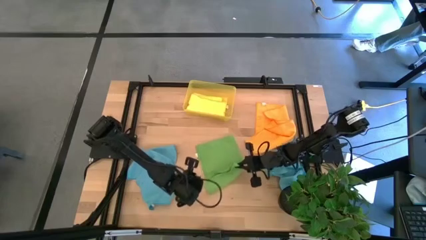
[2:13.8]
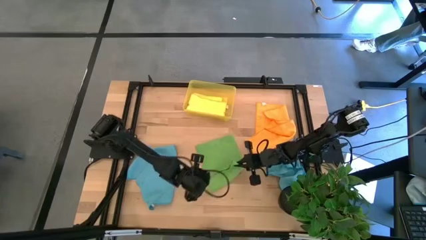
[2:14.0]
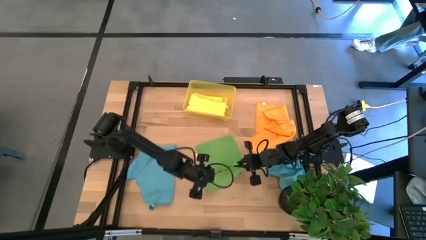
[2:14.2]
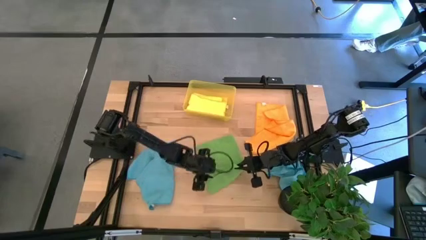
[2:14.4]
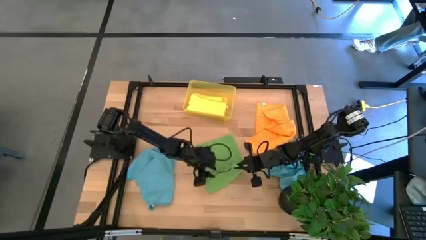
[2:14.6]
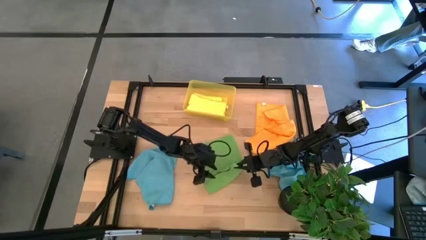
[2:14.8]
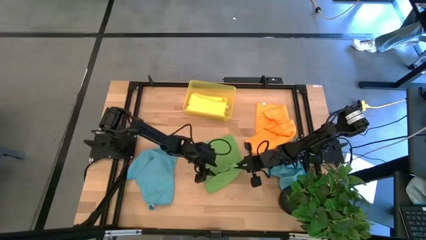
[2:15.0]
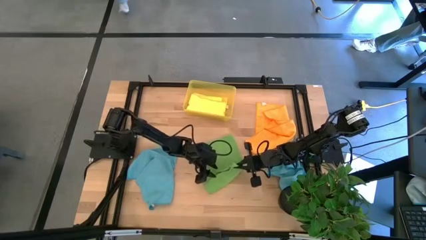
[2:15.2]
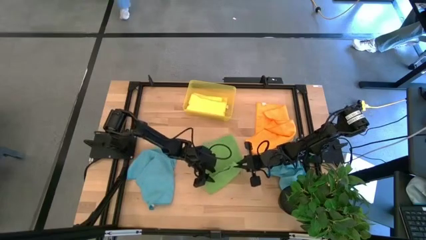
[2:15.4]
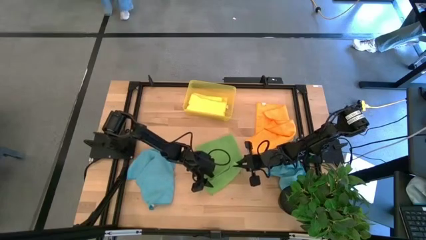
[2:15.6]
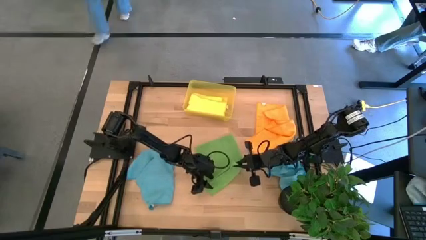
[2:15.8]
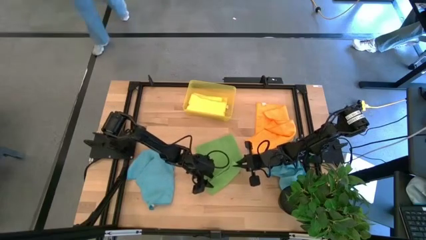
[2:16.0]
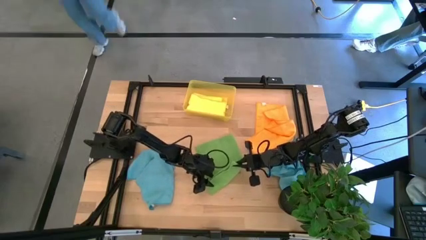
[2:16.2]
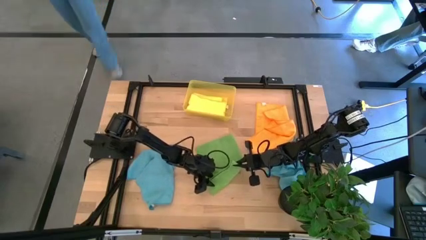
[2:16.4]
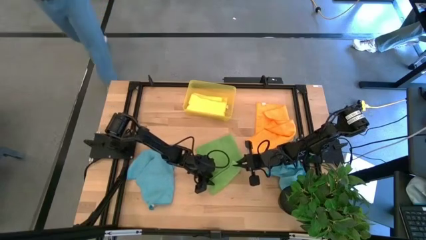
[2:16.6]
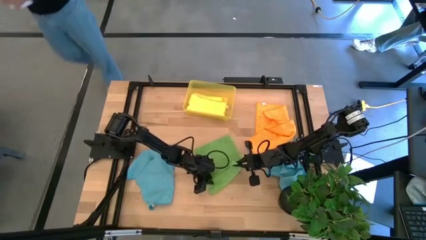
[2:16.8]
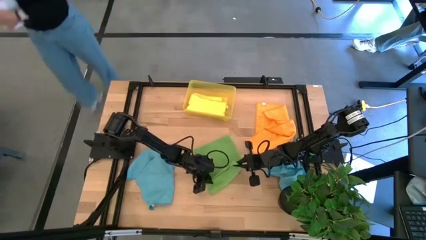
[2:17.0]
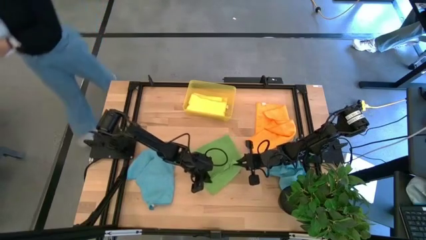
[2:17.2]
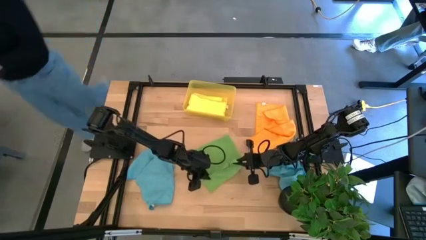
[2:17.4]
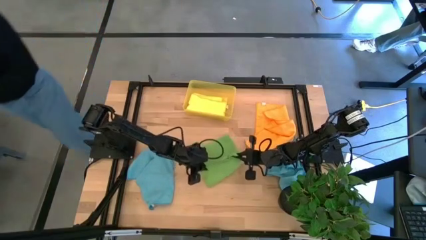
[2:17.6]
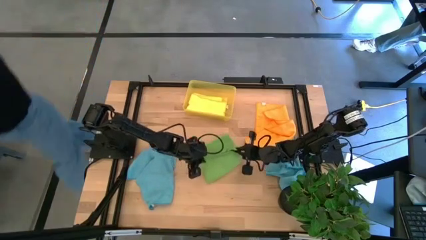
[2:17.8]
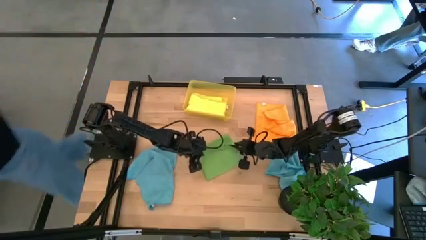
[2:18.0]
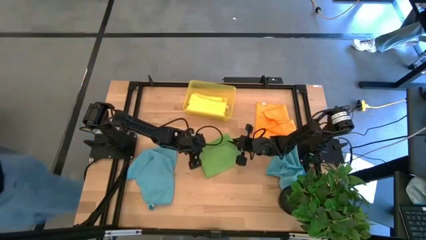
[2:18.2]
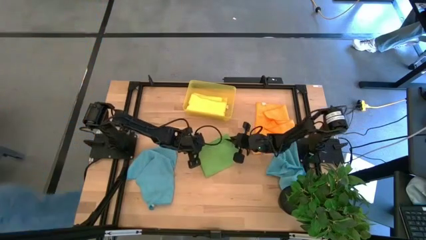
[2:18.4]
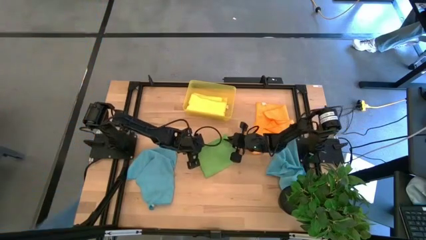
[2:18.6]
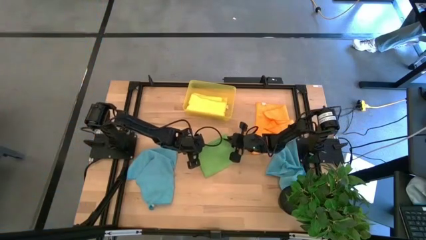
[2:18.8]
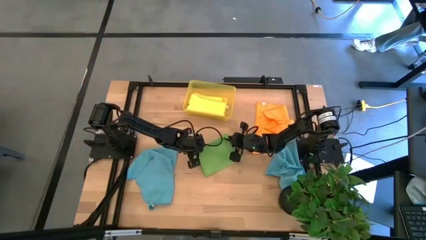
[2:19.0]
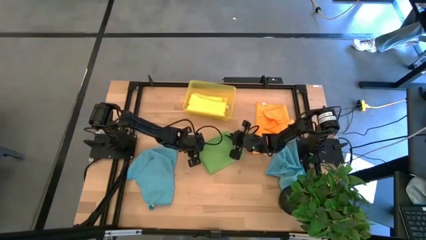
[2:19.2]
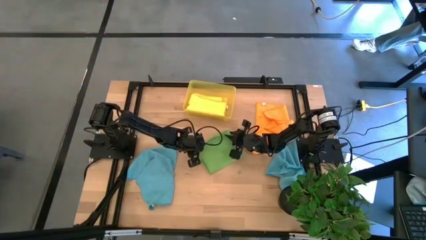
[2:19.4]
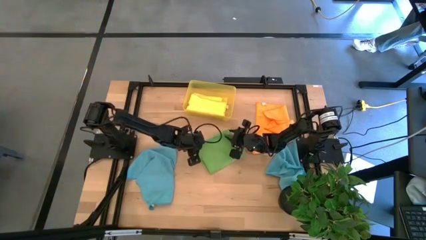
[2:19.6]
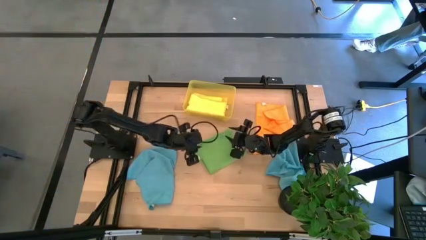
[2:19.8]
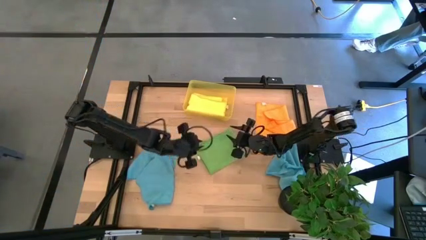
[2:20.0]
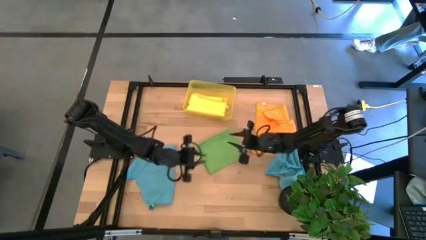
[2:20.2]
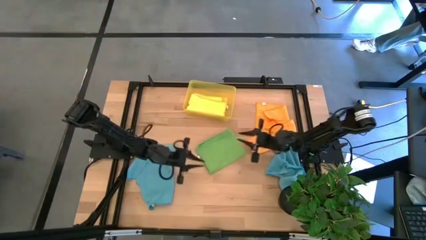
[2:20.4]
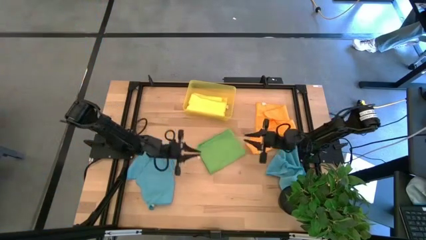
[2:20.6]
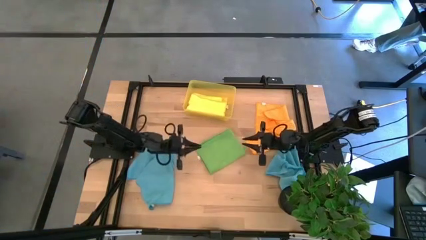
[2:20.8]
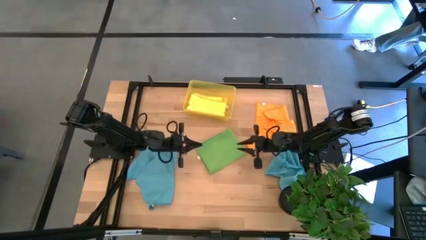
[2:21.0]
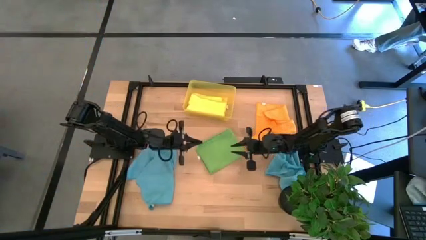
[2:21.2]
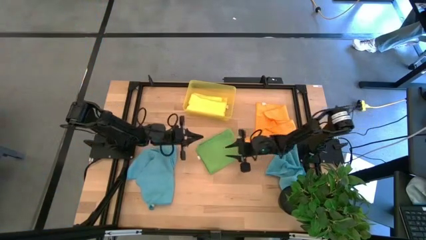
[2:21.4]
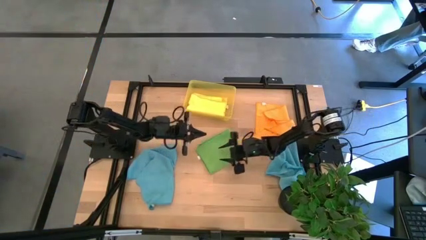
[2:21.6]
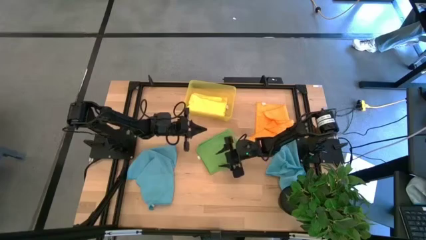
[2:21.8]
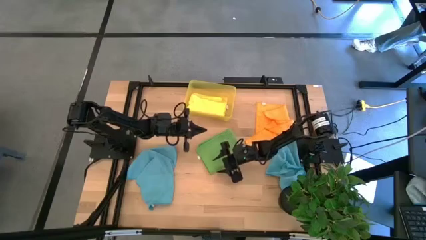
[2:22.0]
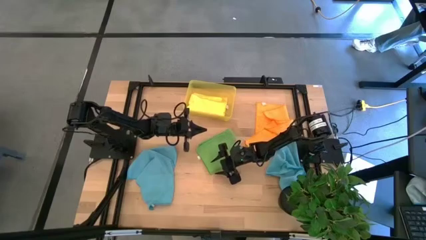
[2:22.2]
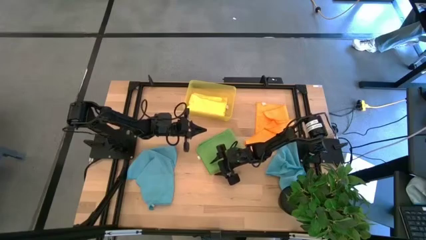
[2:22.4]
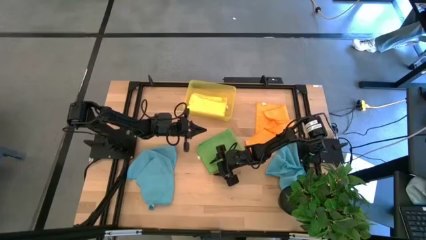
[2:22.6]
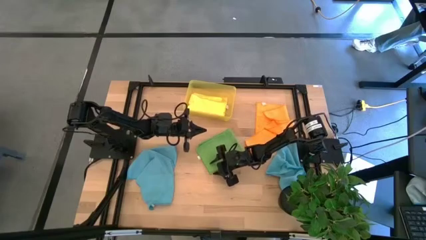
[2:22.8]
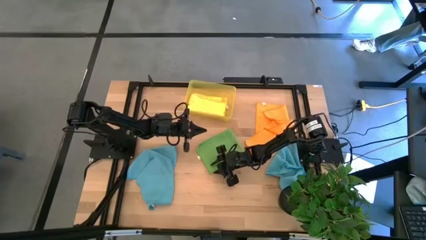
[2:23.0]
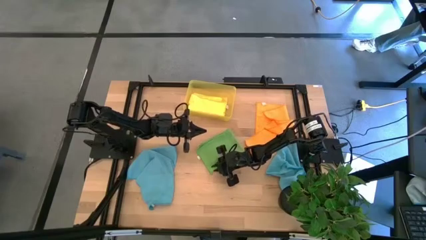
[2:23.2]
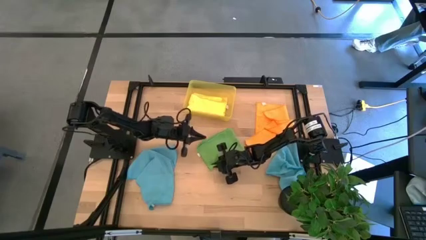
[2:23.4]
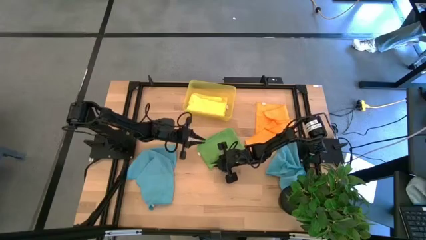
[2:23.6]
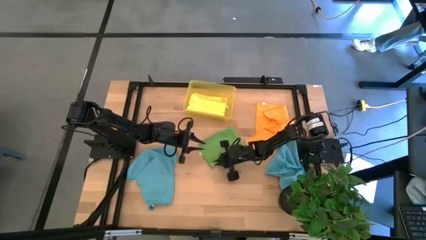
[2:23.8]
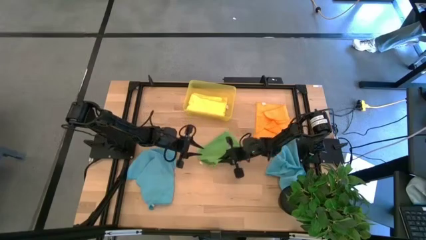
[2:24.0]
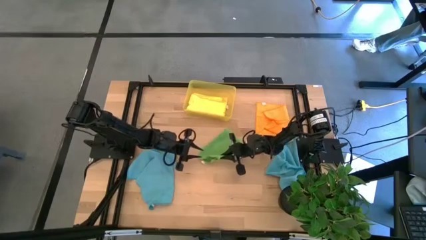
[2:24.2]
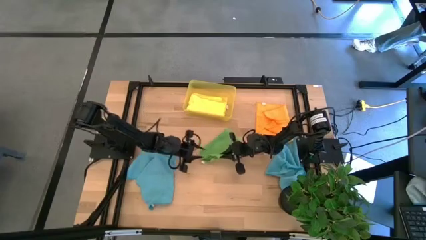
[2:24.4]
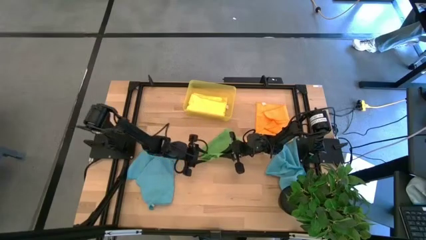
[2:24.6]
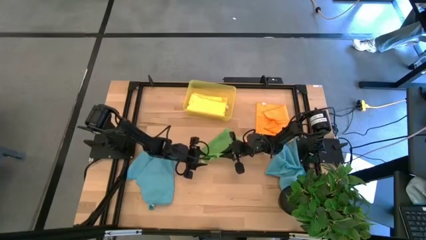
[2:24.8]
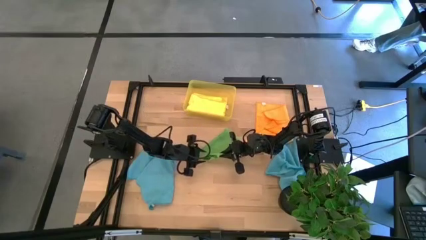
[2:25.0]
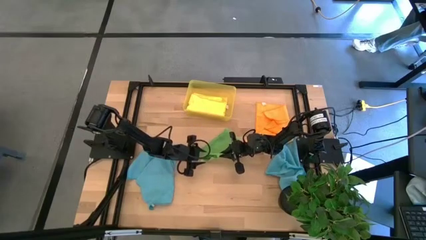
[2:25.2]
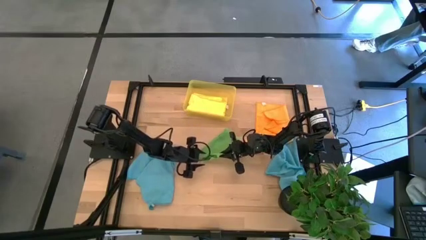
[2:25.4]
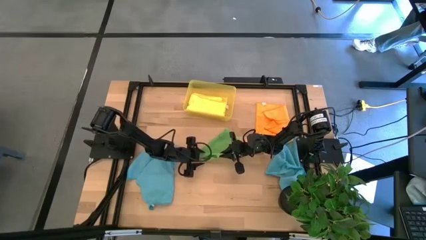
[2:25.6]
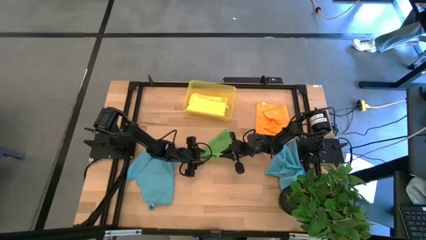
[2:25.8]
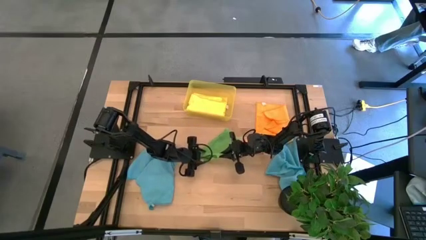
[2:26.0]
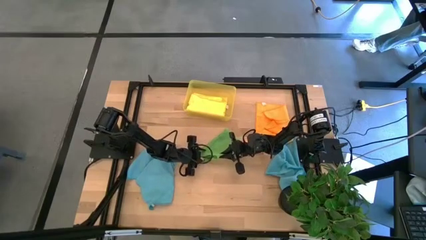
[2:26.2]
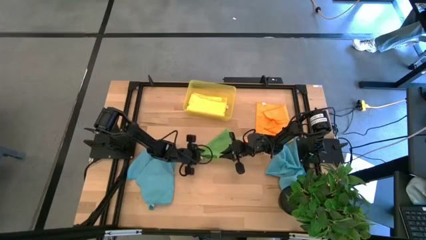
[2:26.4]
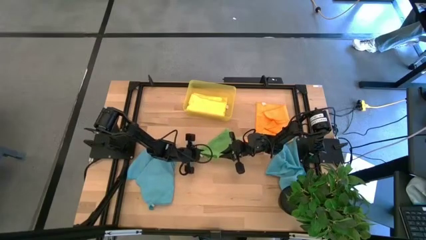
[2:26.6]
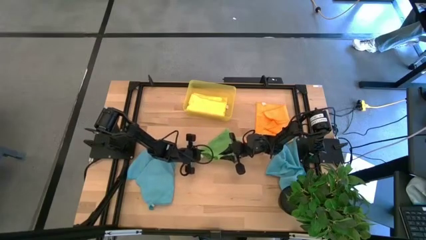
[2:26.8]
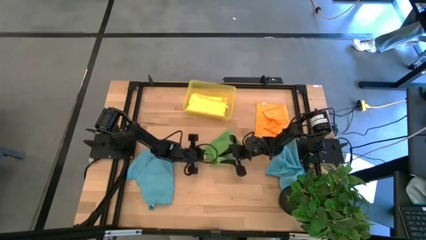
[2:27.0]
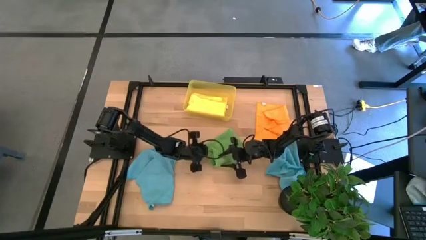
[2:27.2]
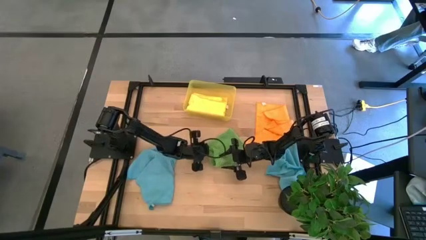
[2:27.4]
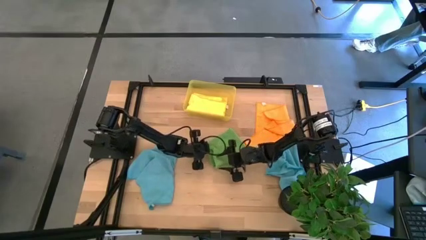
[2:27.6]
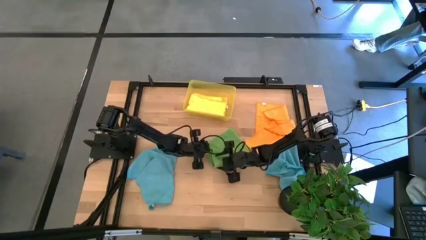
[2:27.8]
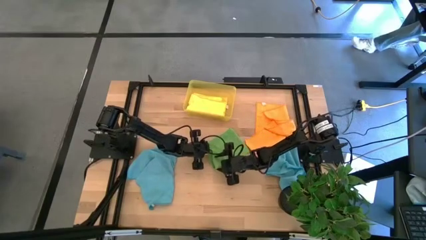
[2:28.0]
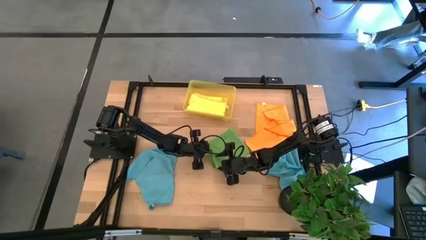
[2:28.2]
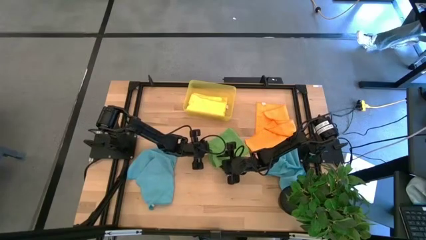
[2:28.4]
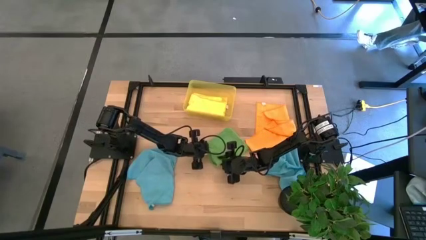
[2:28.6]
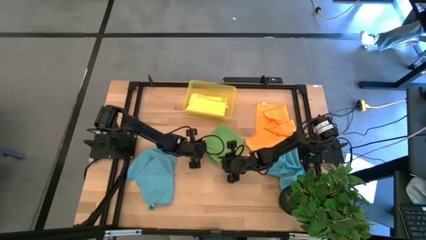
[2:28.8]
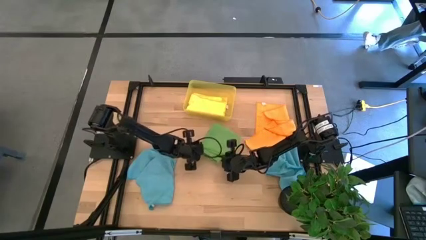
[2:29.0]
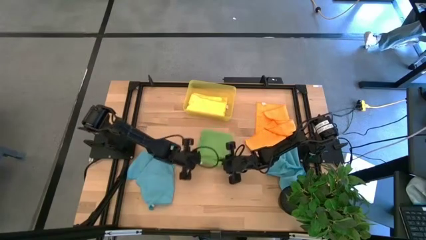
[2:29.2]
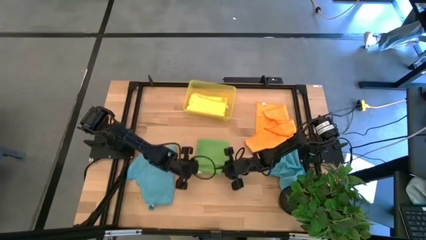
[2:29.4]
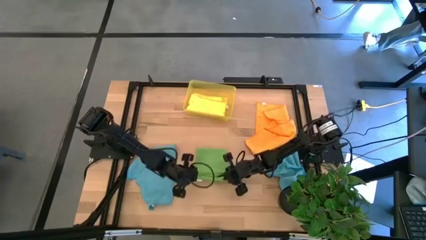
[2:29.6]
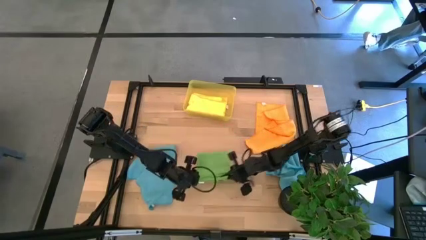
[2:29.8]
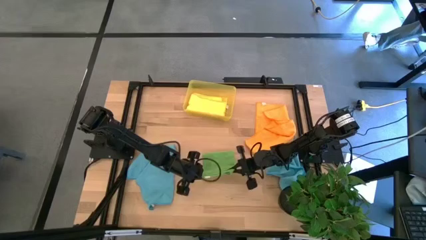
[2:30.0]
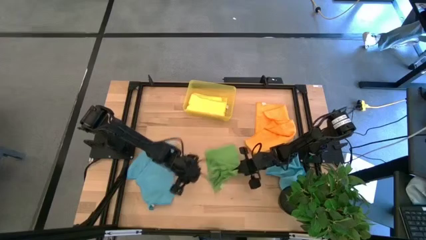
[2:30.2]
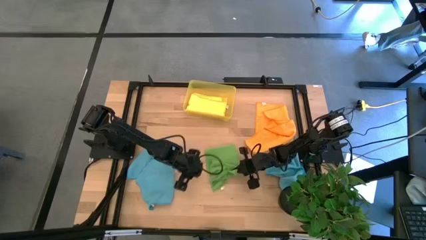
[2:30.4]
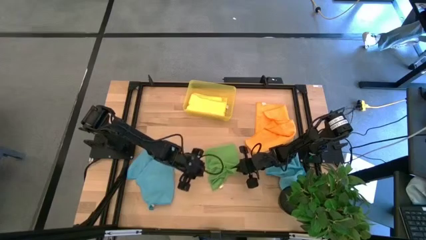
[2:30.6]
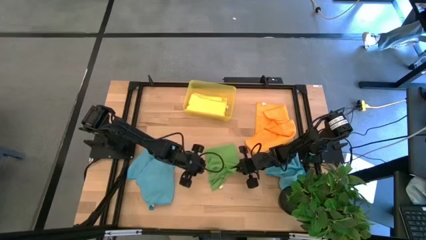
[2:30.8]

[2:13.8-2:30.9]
Task: Fold microfiber towels
Fold the green towel
